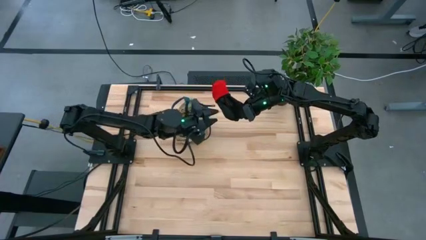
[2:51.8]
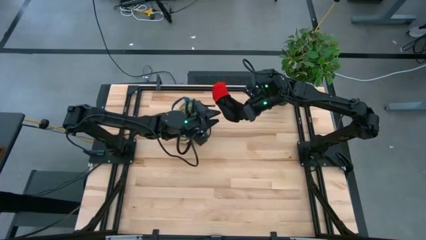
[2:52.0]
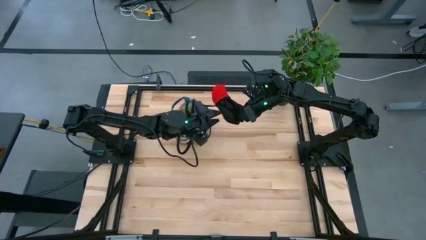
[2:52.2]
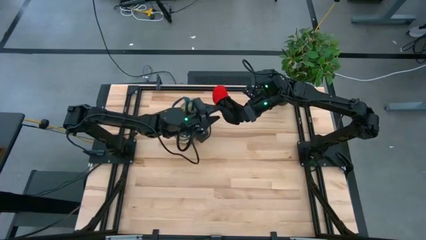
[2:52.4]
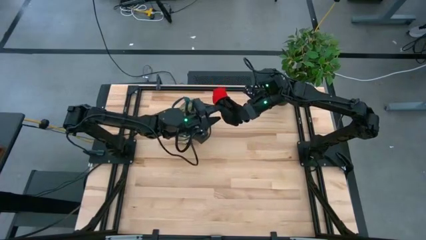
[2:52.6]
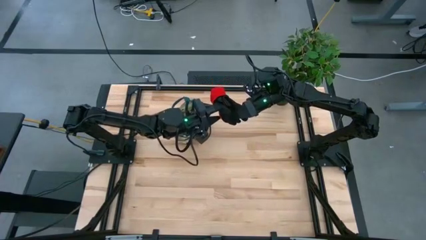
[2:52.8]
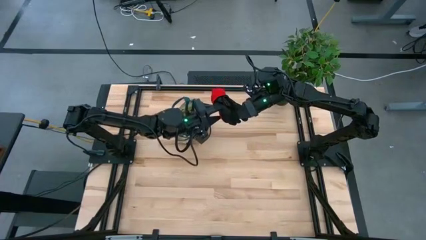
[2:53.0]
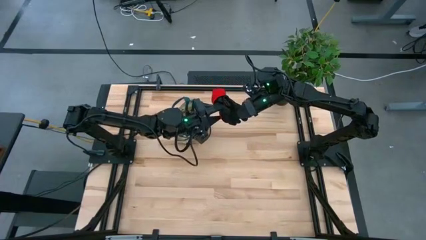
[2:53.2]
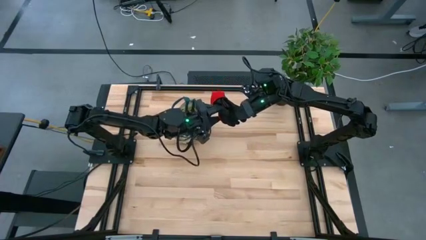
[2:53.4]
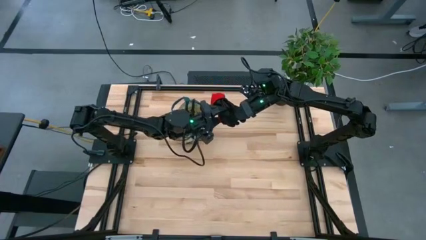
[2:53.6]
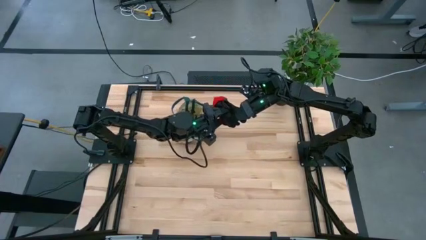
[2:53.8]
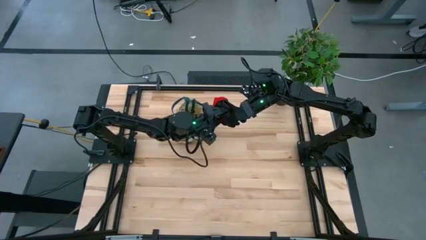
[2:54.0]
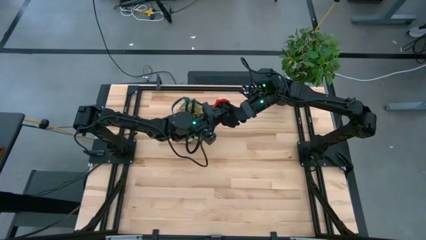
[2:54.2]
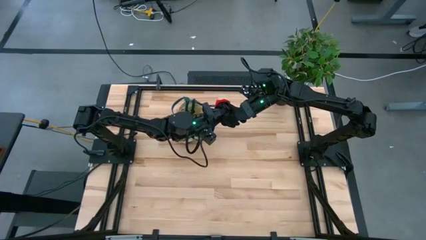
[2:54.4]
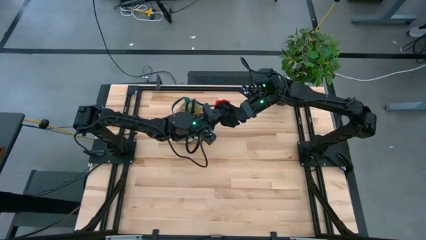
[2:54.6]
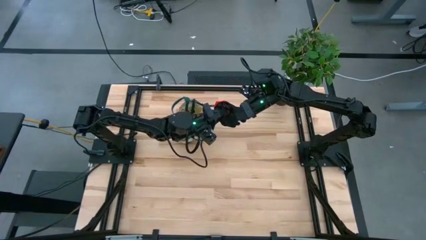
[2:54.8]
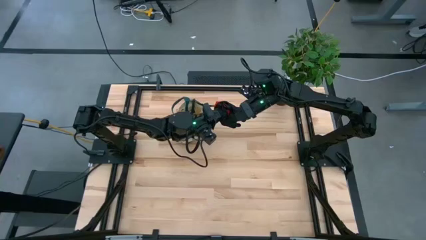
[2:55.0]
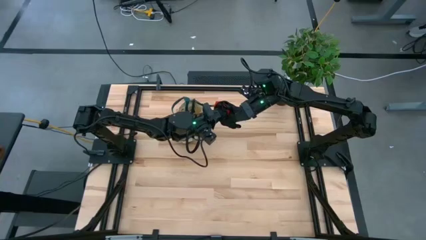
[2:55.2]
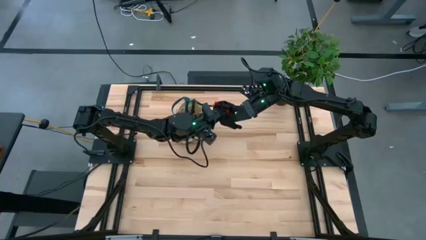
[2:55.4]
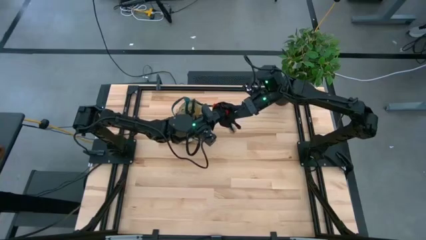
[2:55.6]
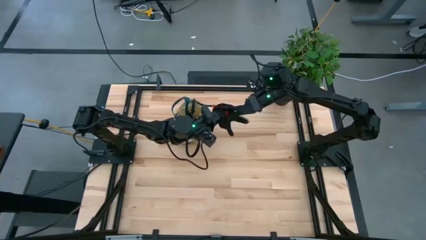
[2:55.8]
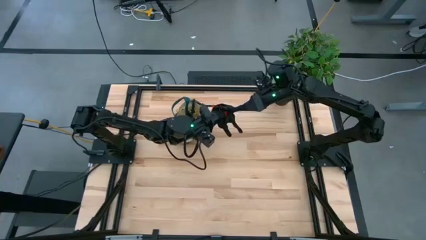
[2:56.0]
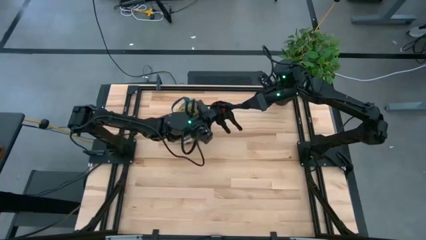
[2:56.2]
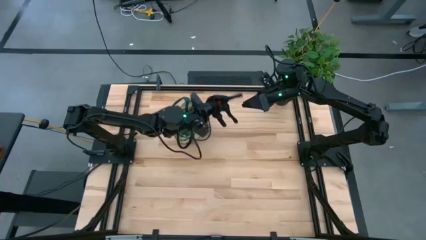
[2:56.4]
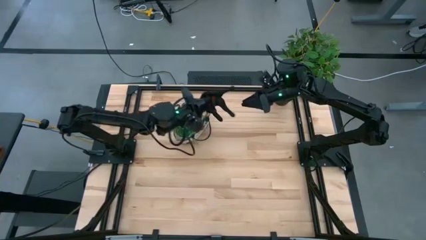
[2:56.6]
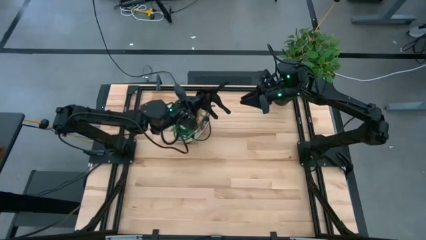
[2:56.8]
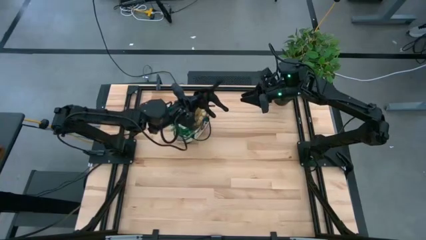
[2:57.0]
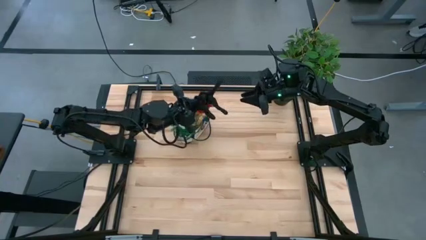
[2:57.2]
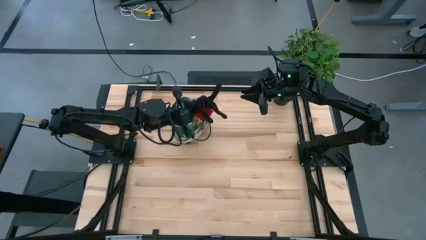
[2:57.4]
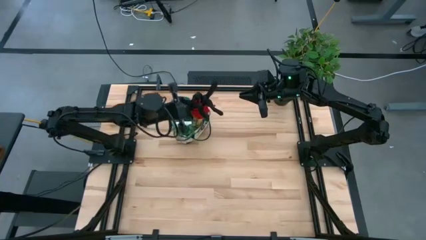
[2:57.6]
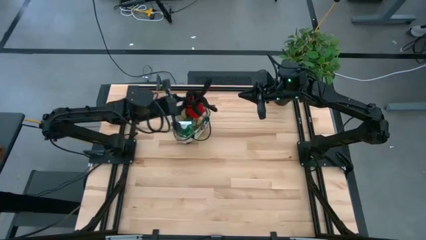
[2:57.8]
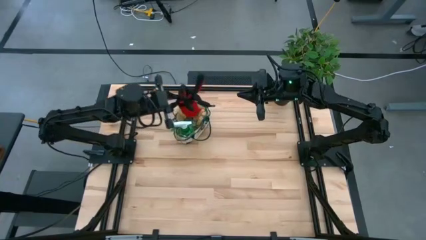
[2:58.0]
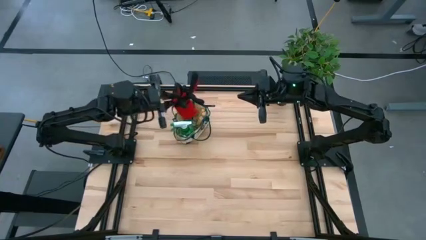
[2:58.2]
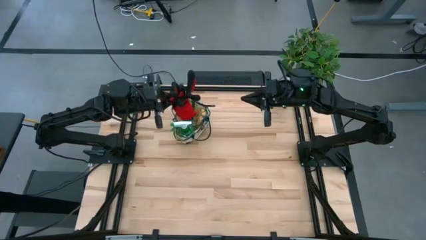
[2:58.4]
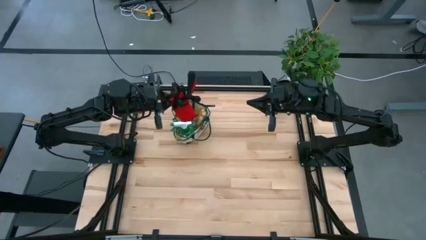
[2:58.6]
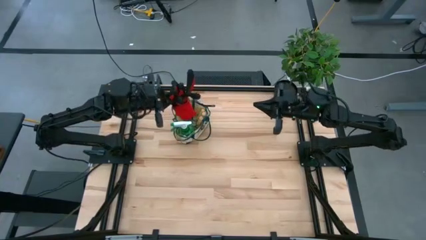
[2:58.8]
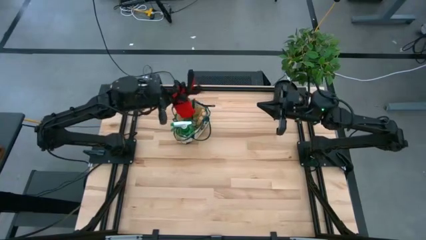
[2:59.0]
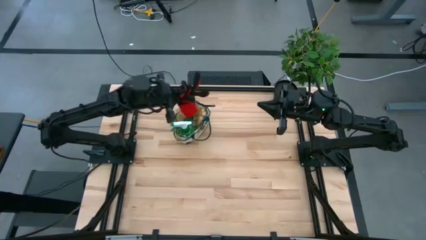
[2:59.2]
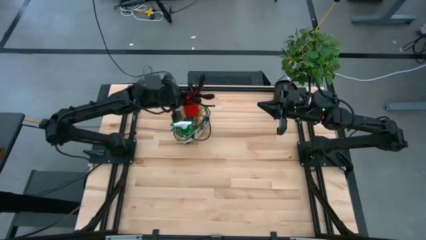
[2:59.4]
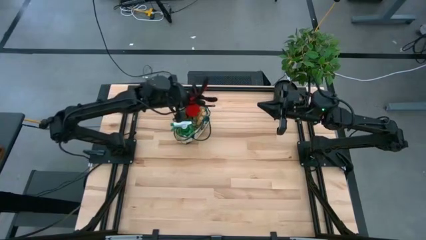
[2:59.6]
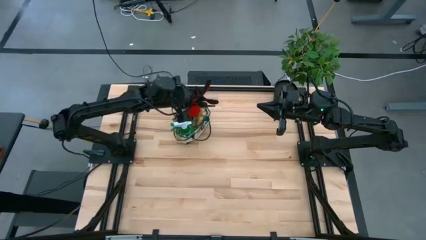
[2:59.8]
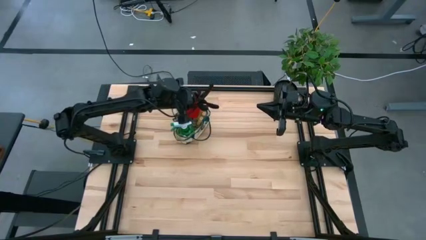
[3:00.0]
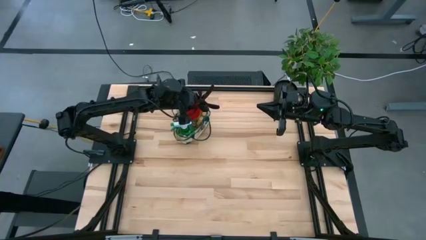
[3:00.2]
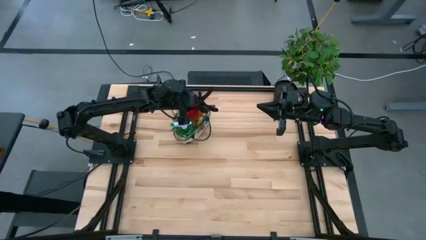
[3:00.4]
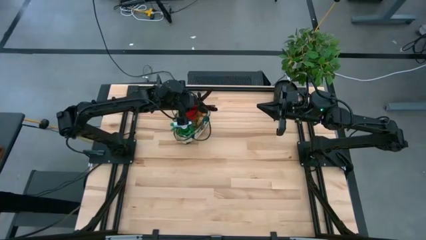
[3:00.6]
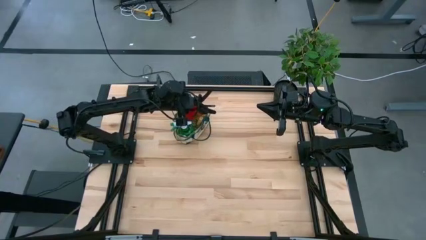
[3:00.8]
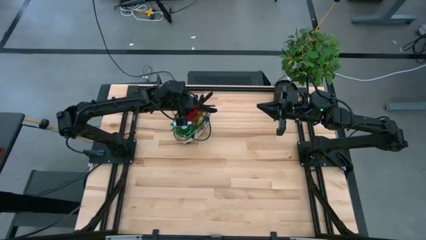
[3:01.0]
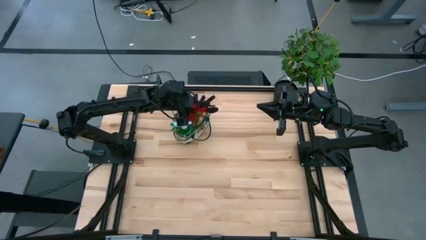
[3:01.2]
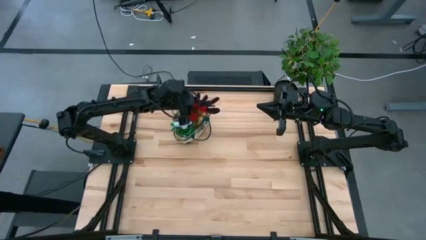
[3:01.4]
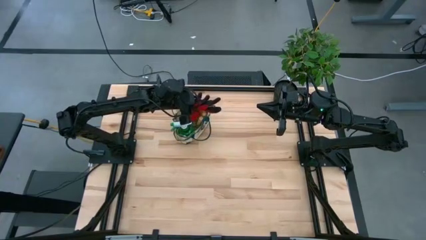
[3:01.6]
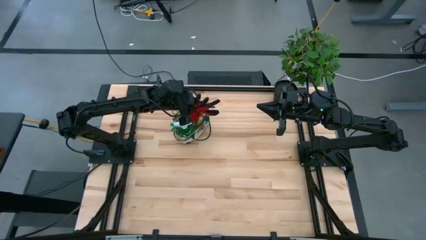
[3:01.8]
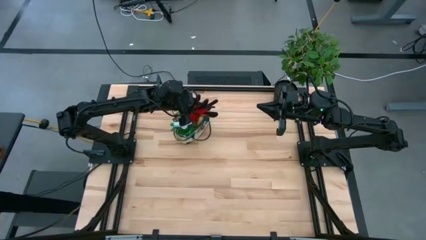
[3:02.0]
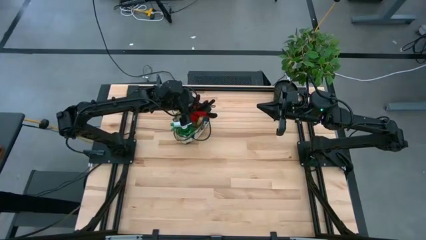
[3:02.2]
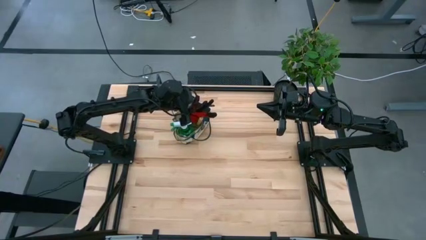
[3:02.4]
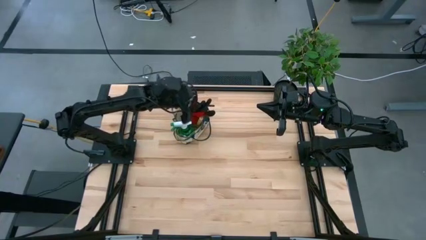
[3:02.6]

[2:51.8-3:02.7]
Task: Pick & Place Garden tools in Gardening bag
Put the red gloves into the gardening bag
